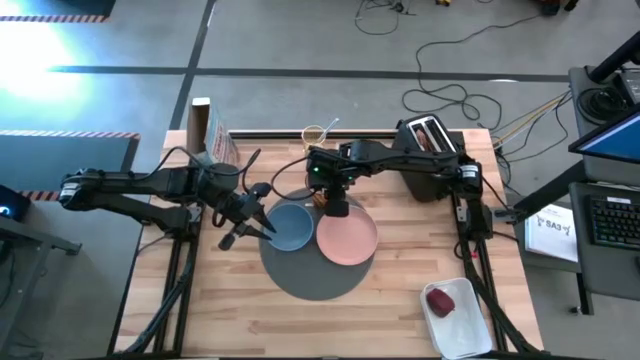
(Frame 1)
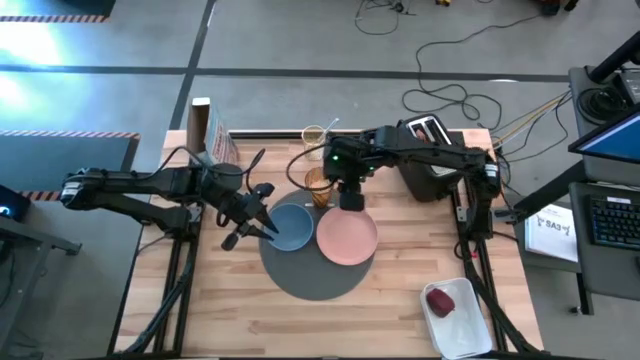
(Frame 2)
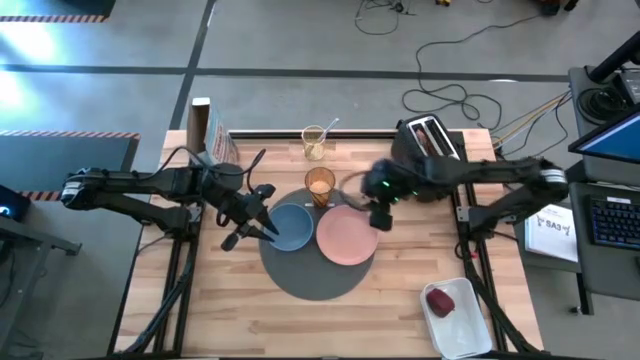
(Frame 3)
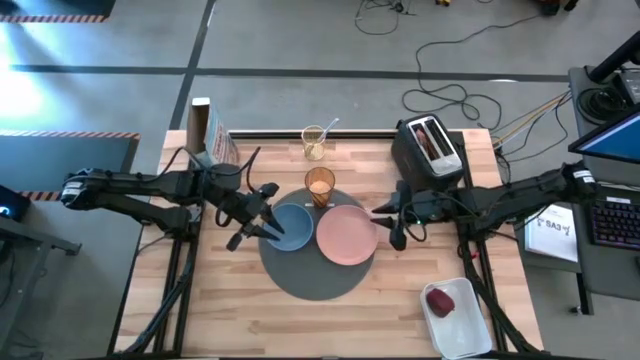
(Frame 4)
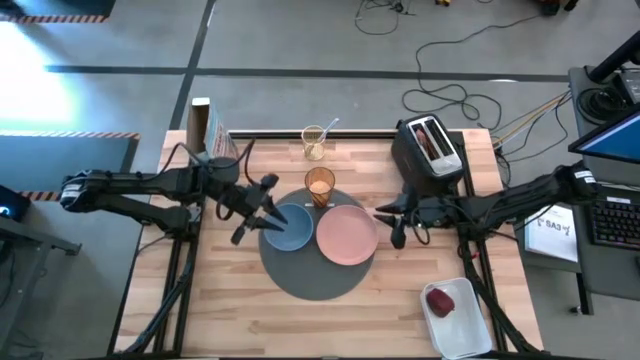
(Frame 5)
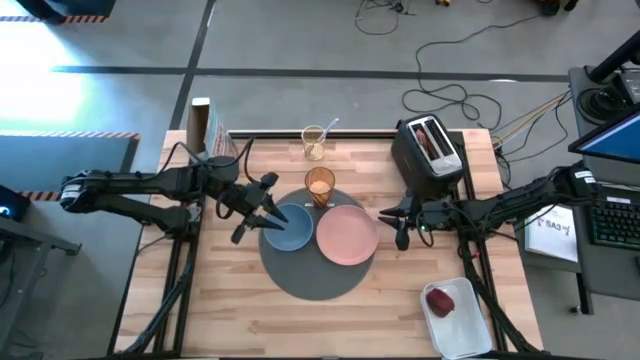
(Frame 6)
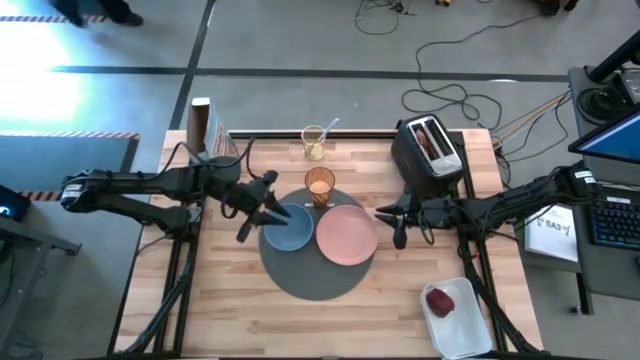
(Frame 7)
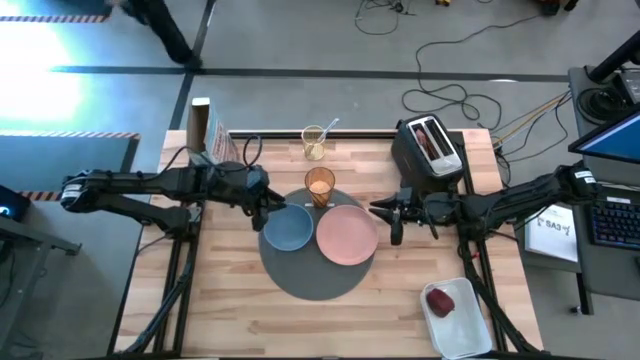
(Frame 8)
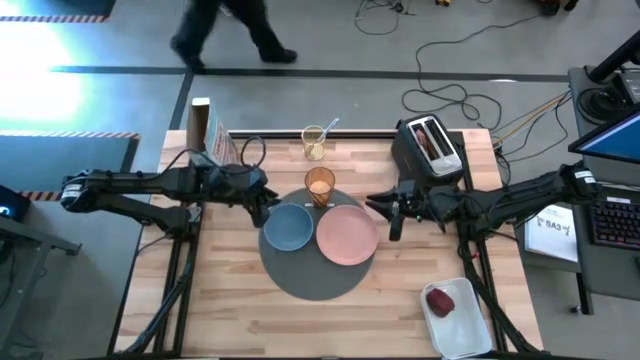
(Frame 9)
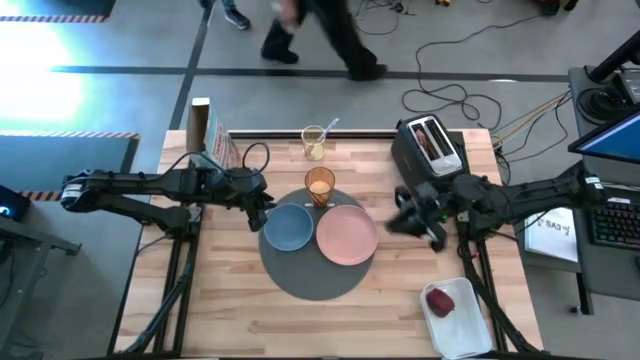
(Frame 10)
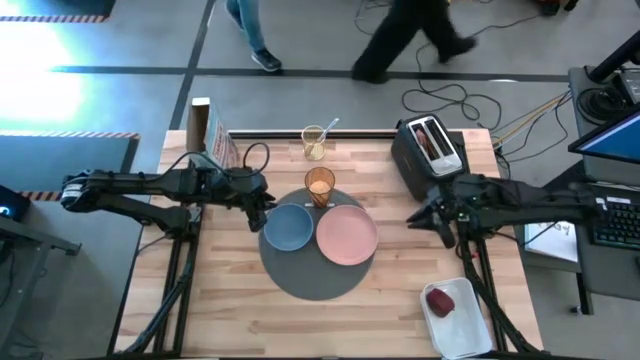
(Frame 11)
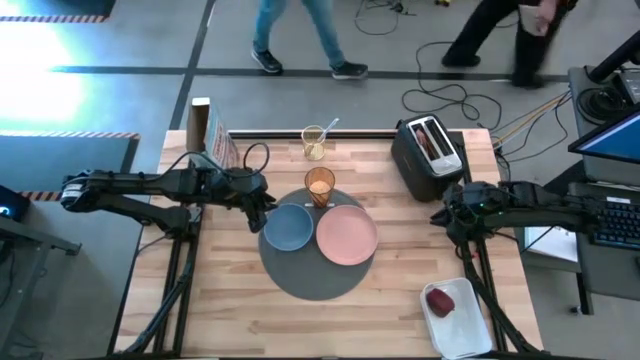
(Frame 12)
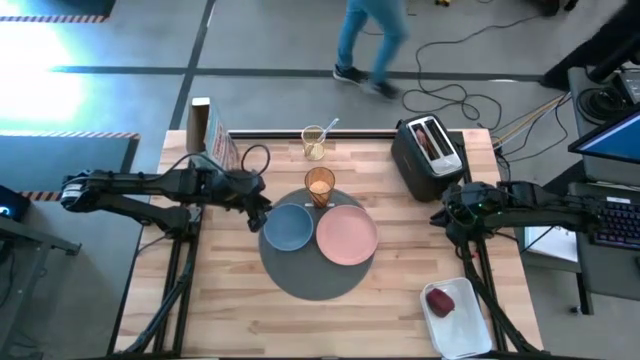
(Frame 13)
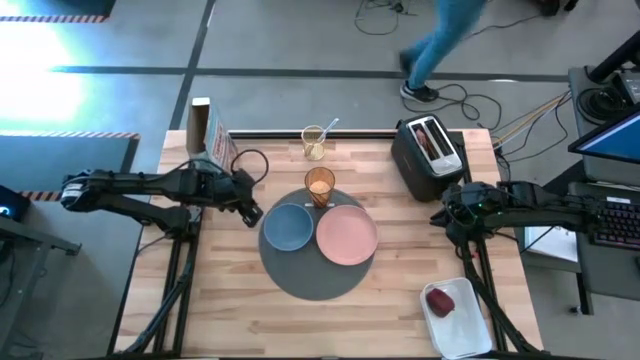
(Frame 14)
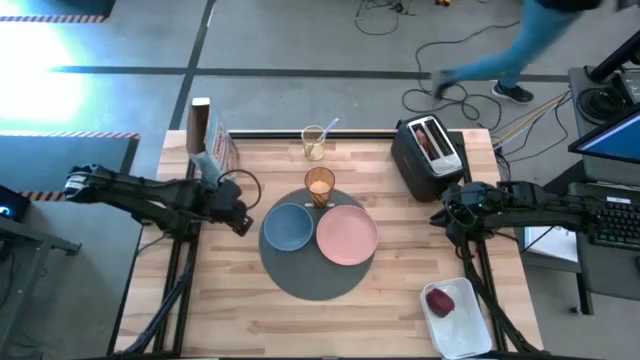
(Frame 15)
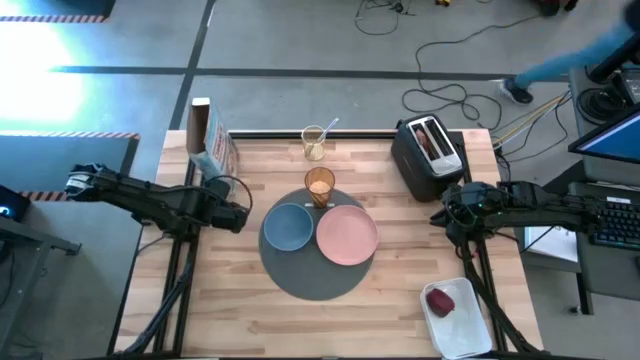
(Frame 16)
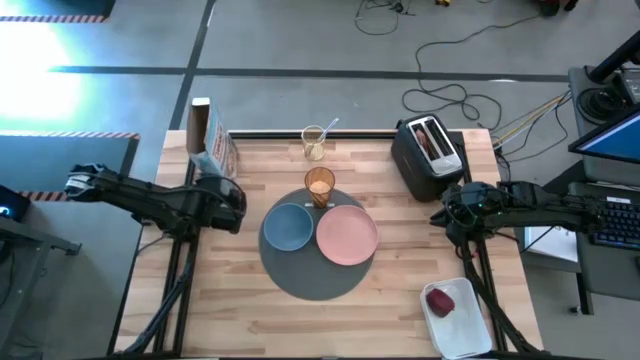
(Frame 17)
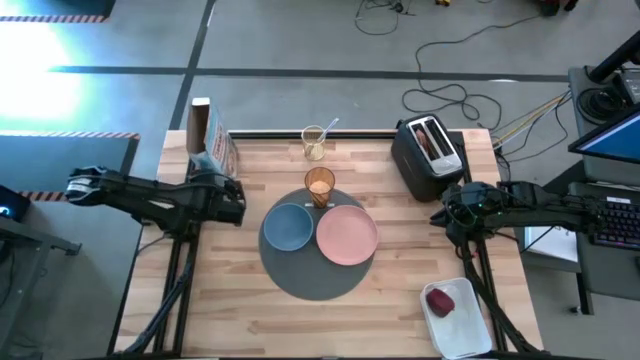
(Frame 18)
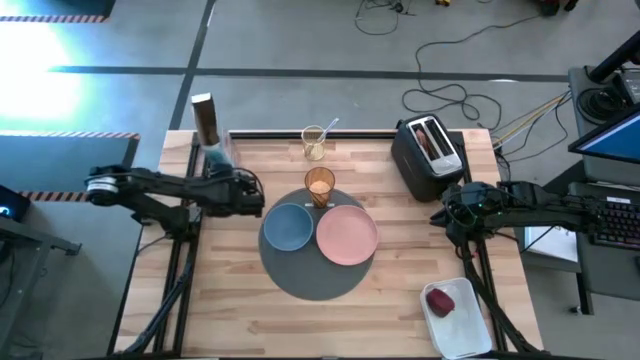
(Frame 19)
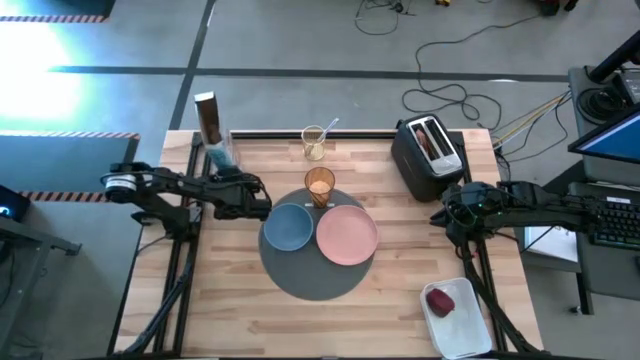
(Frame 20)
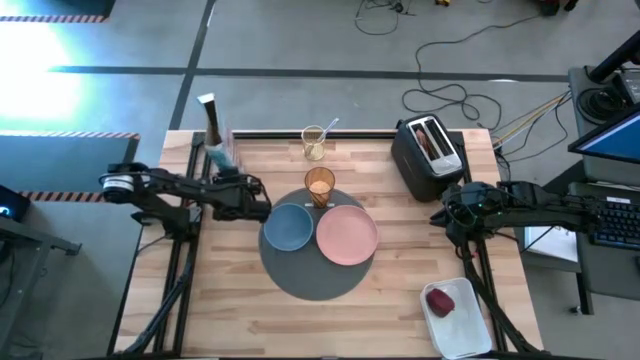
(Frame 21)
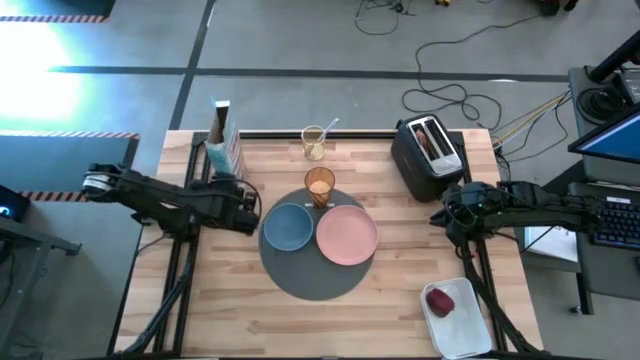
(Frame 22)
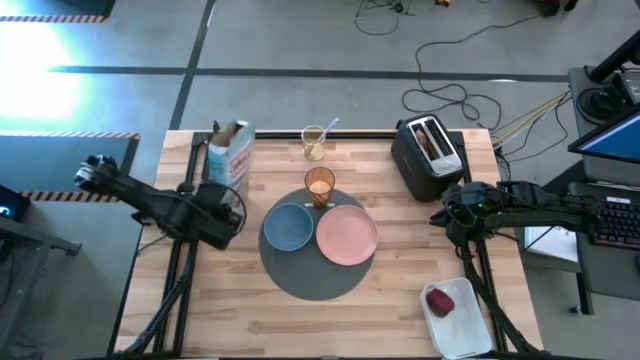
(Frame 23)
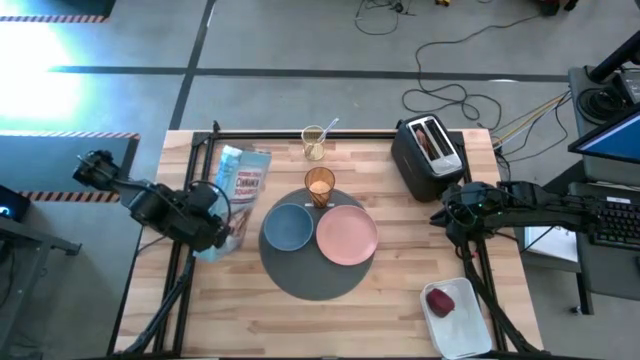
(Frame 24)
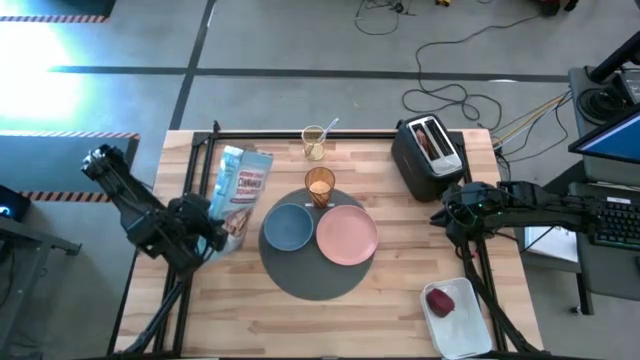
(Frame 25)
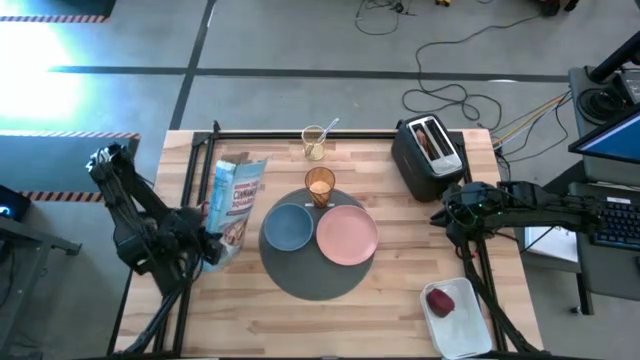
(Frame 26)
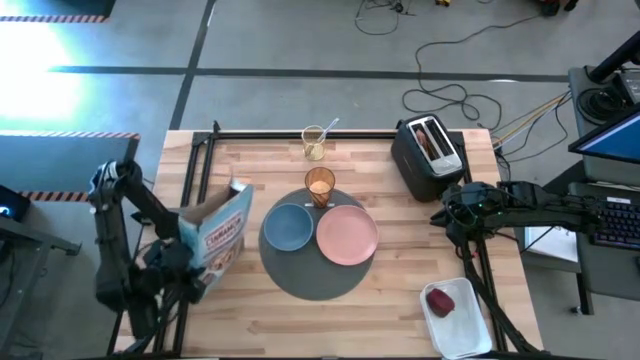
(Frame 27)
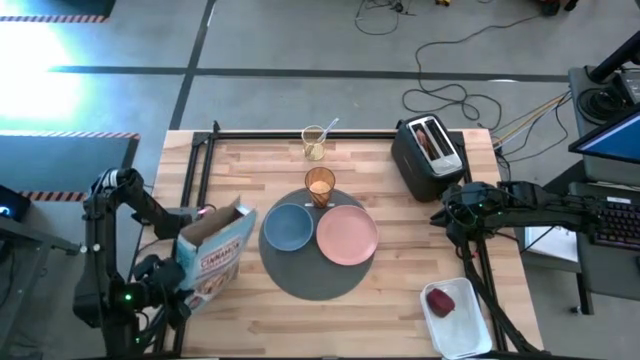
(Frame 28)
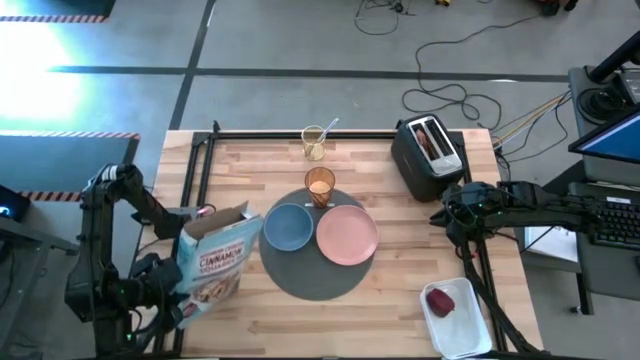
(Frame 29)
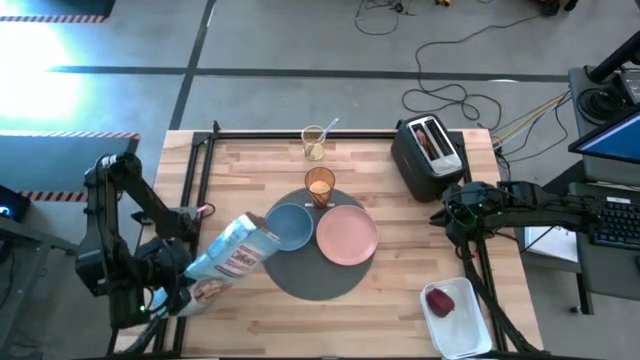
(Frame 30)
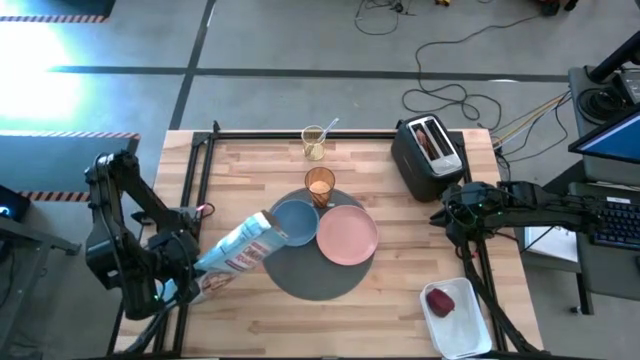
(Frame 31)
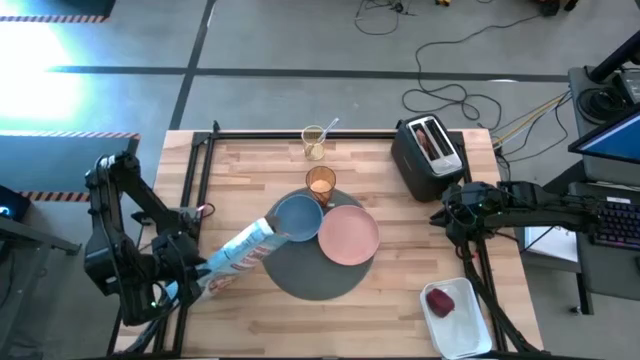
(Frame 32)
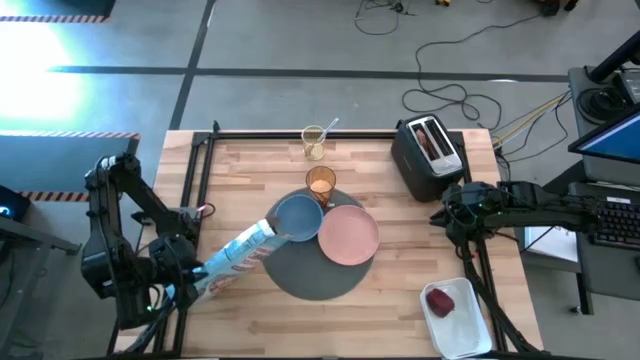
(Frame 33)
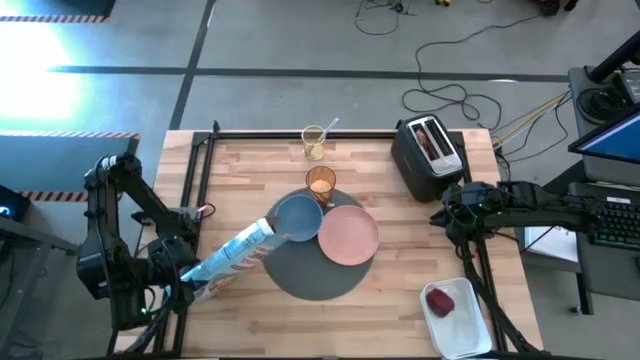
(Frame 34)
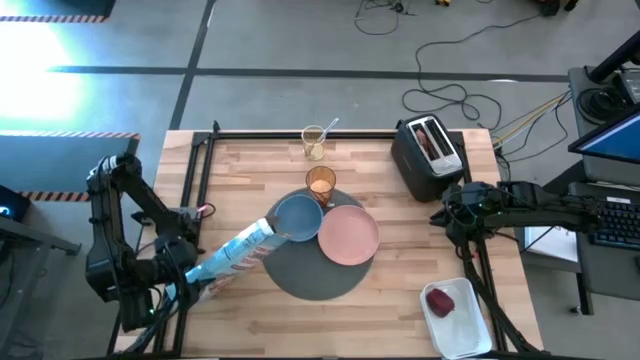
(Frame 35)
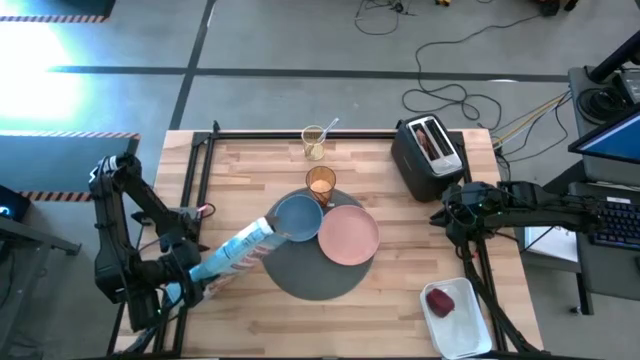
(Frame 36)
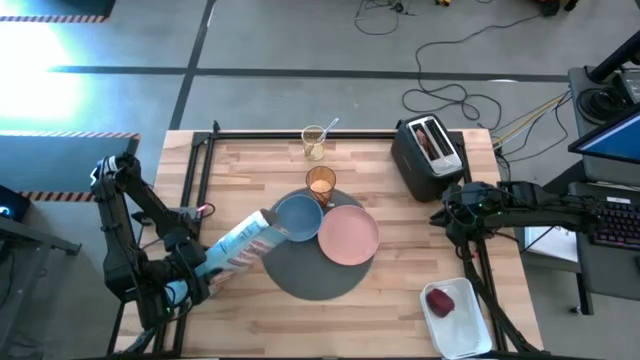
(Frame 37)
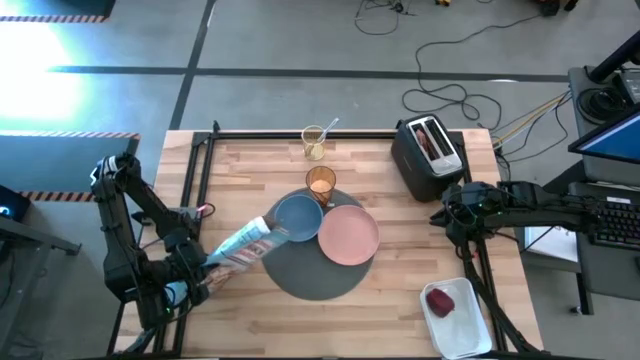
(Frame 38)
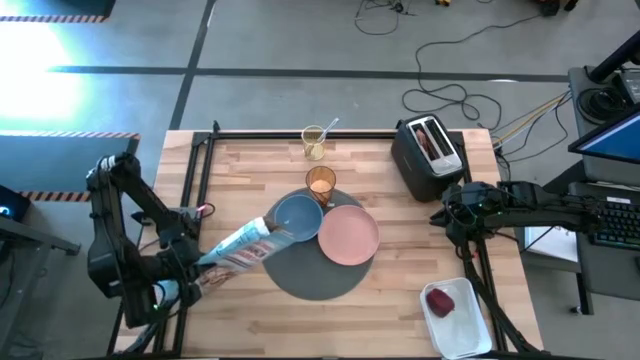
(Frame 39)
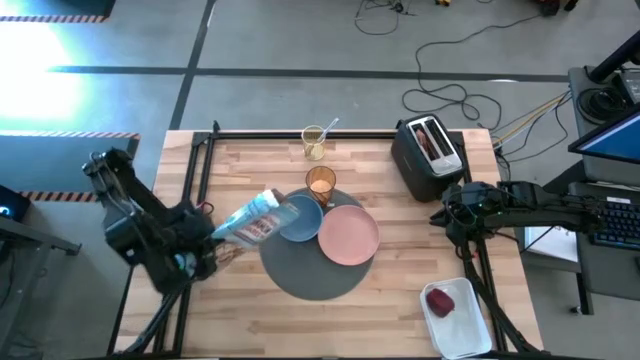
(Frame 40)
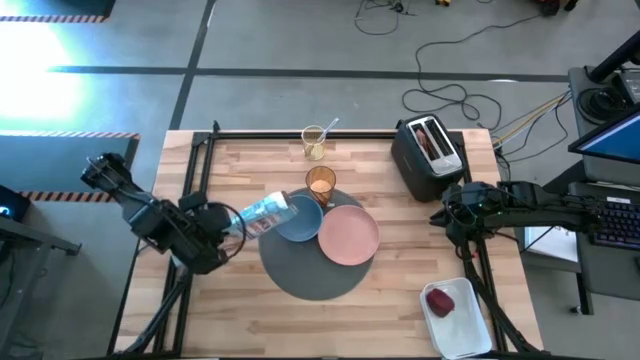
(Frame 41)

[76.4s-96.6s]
Task: Arrange a breakfast setting
Pour the cereal box into the blue bowl
